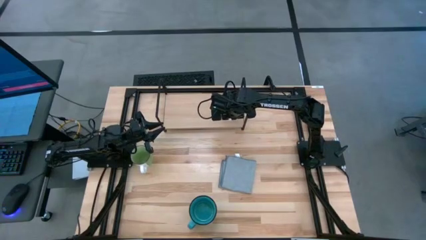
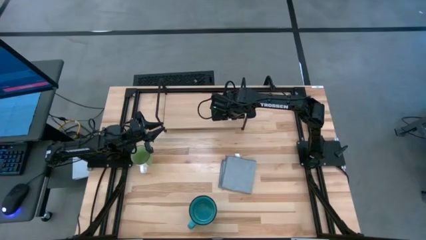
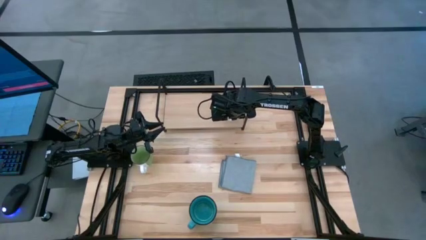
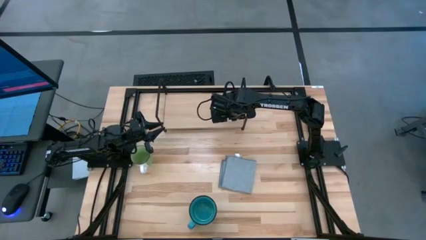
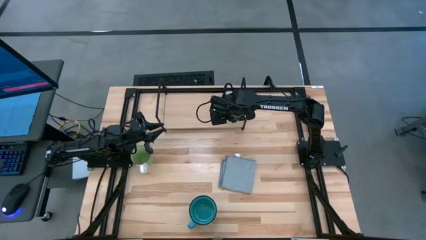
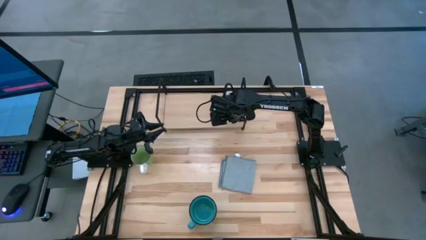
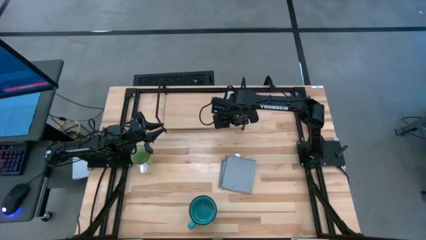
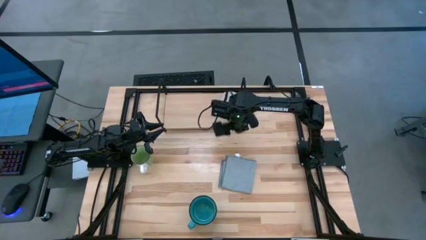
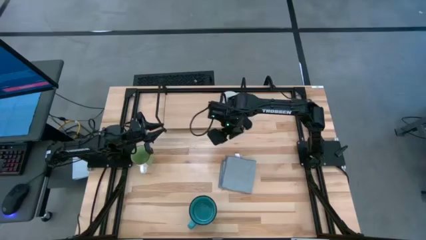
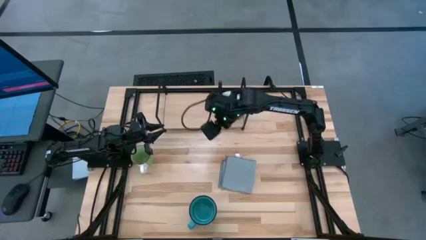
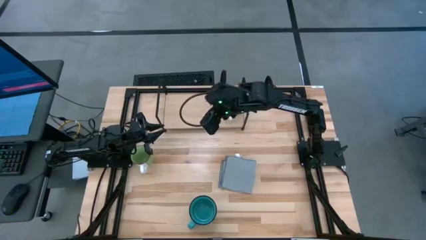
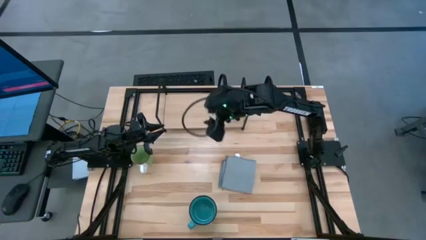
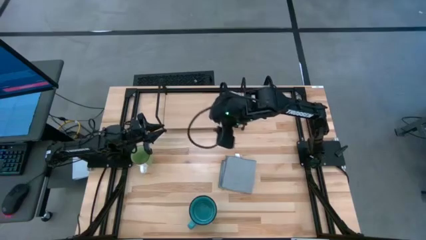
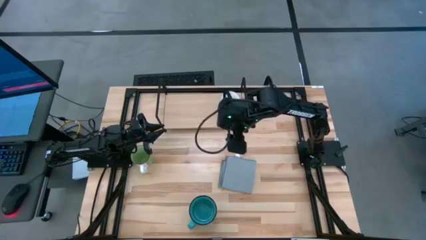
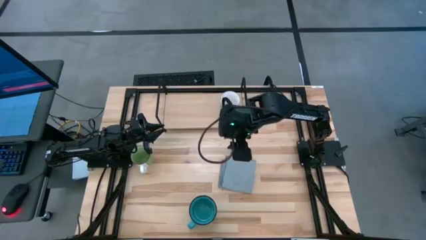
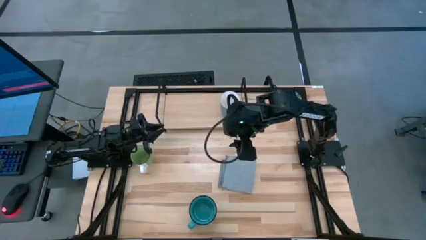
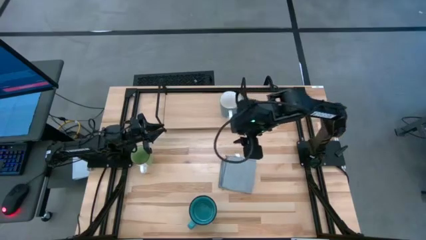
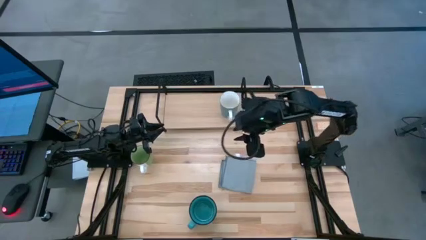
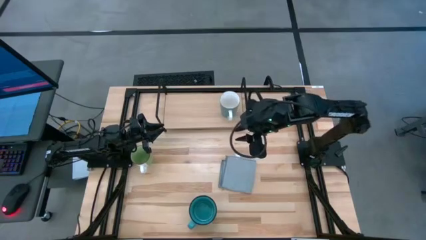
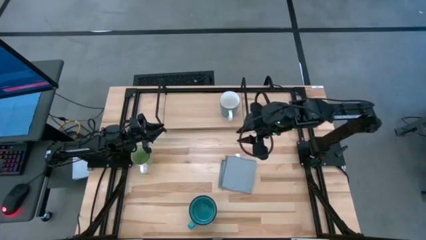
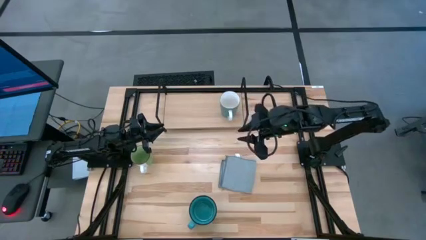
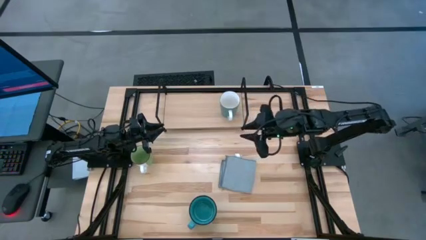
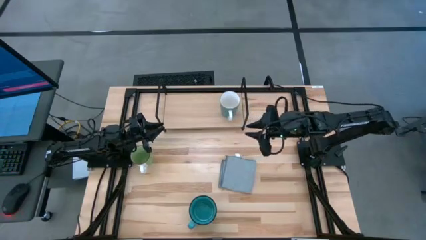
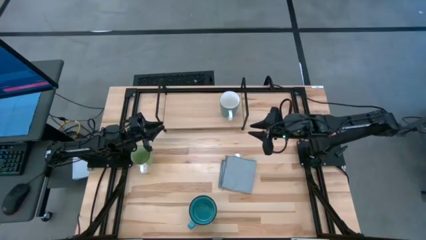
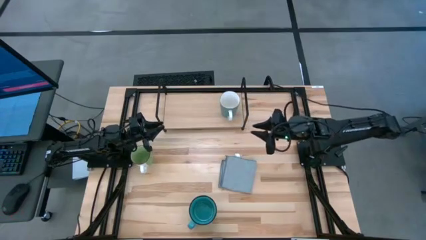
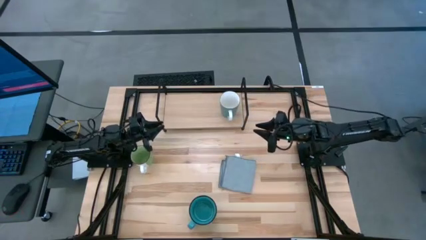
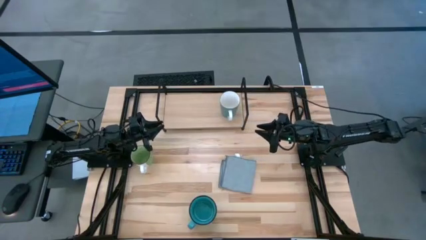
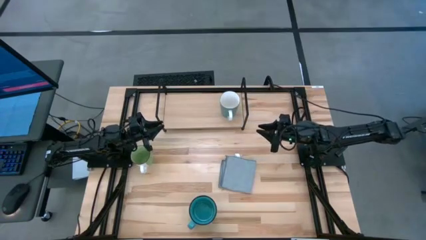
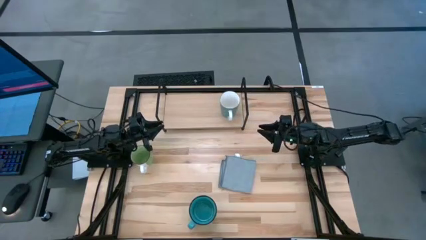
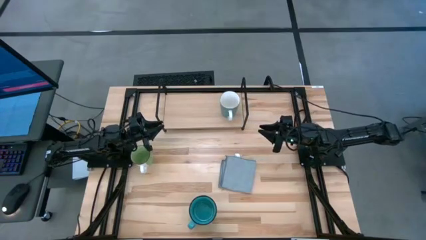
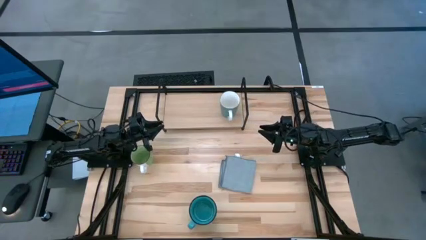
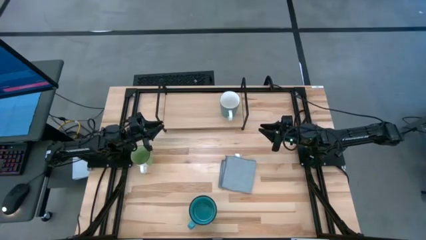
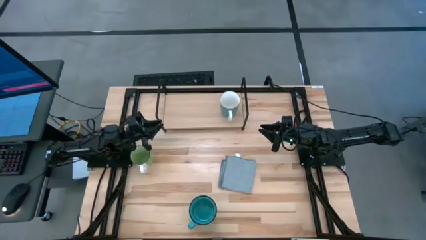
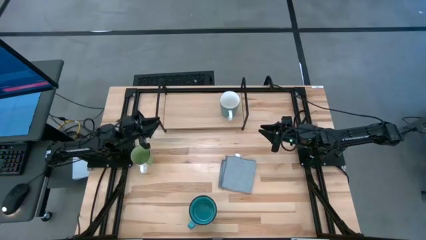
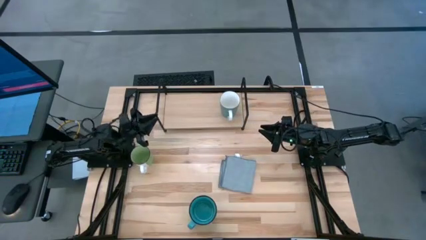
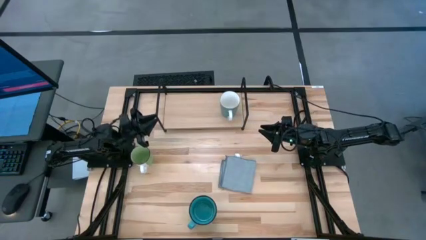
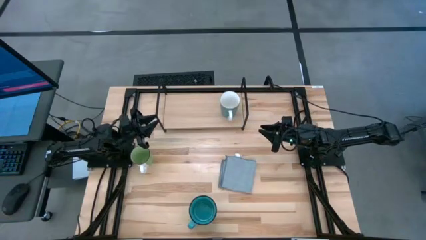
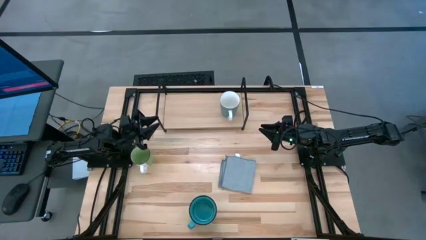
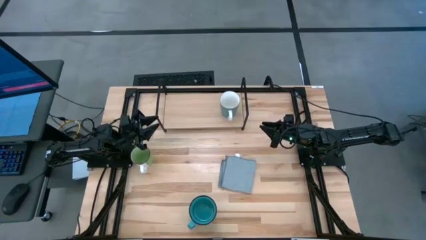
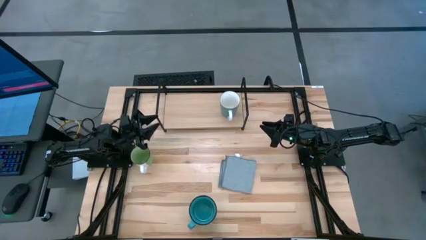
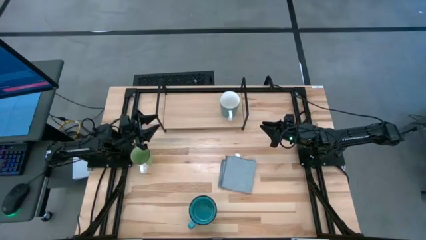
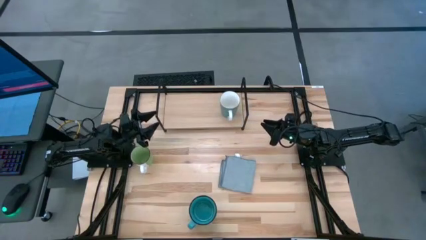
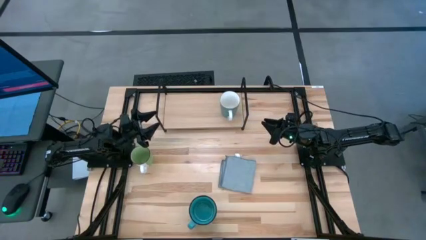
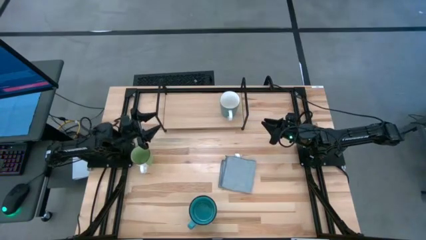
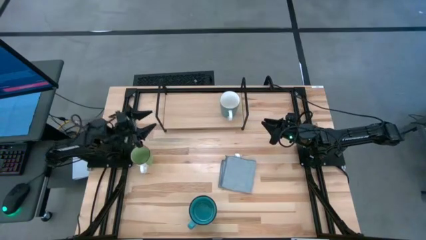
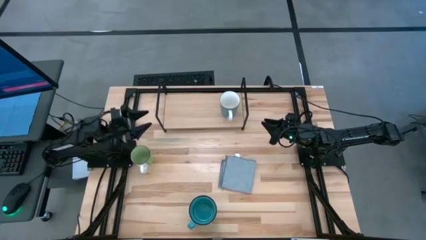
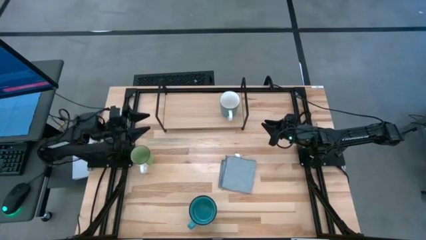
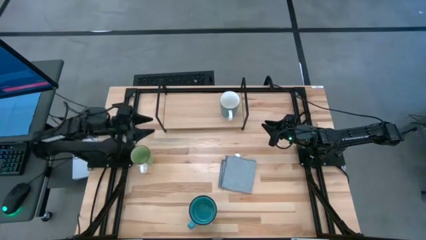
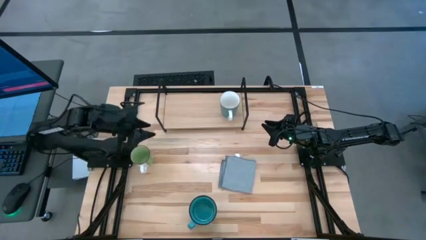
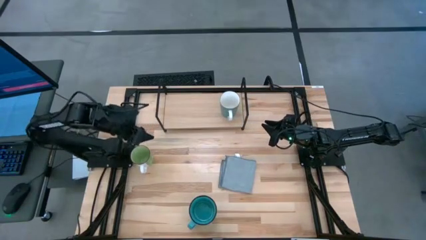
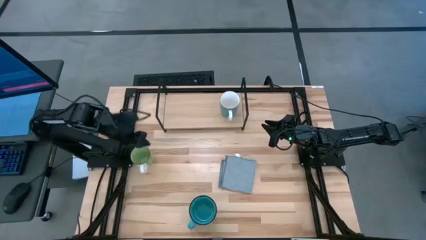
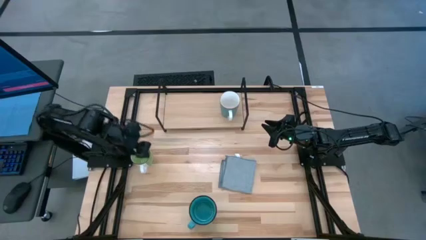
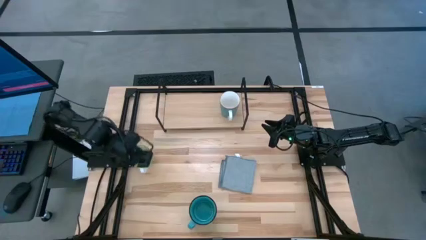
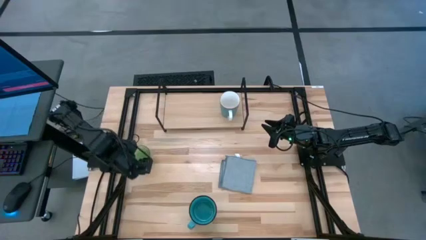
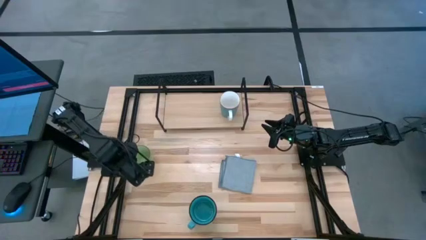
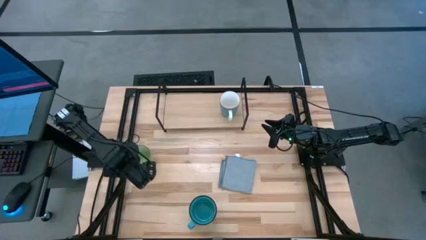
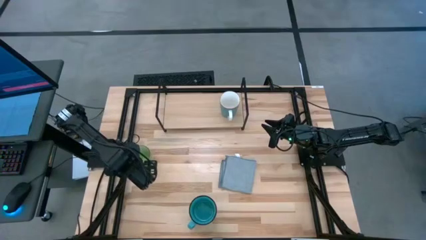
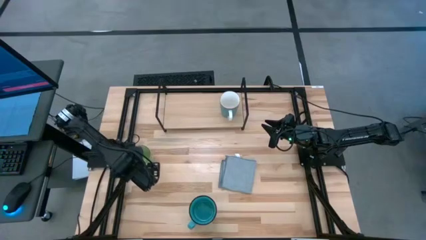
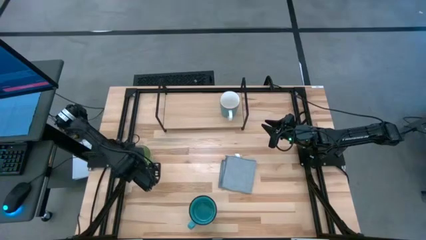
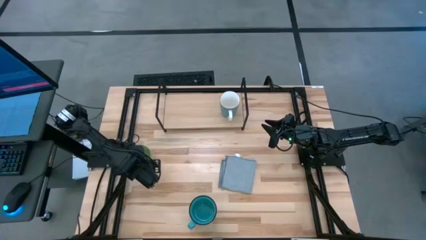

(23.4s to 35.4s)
Task: Stack small to large cups/mugs on shelf
Put the green mug on the shelf

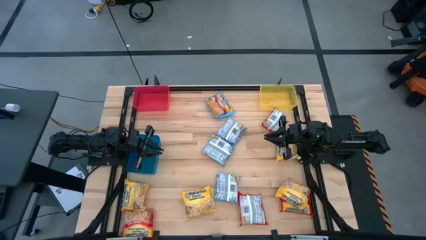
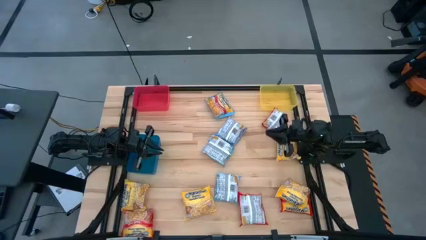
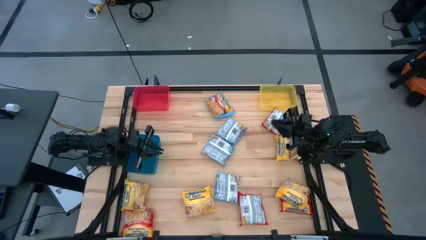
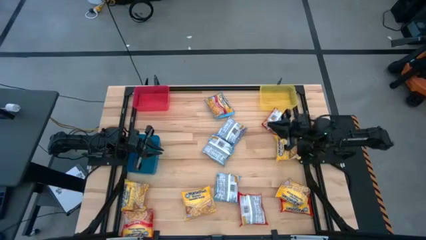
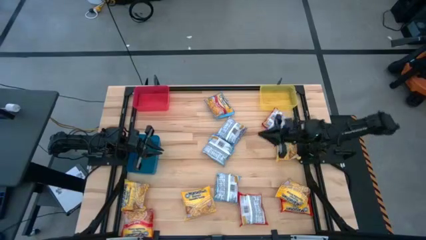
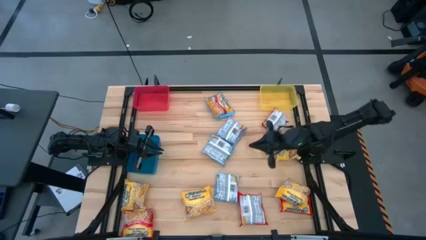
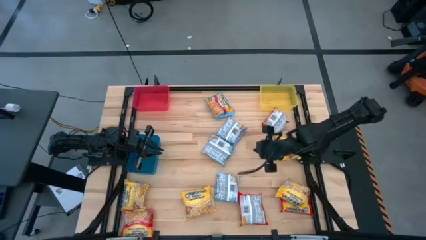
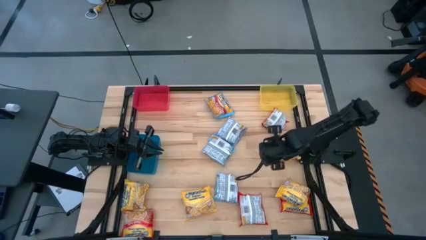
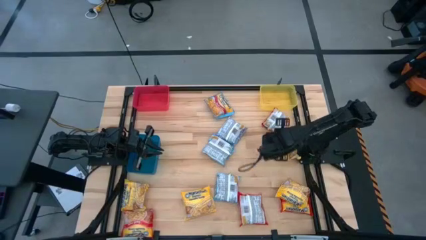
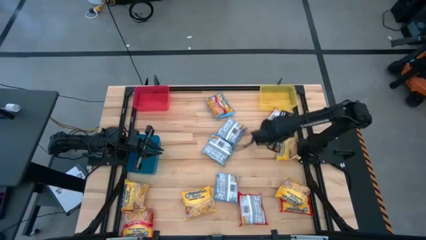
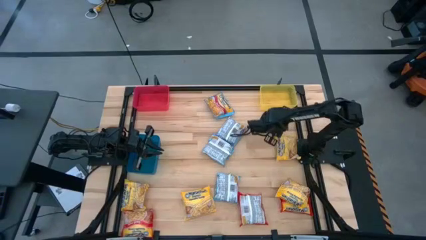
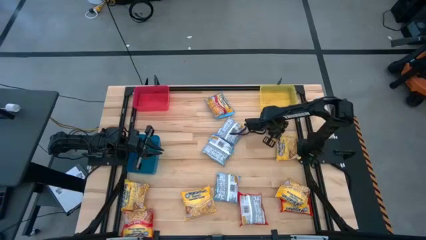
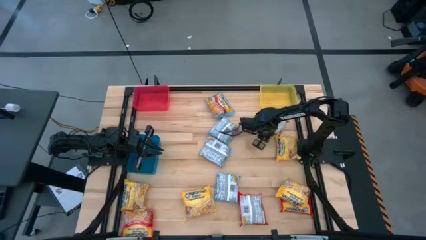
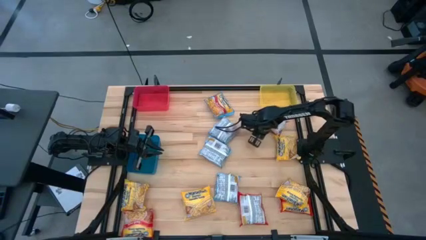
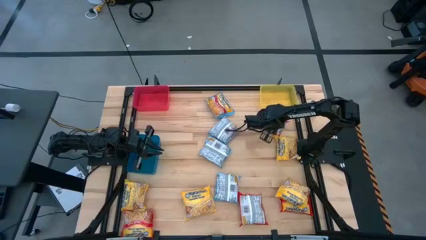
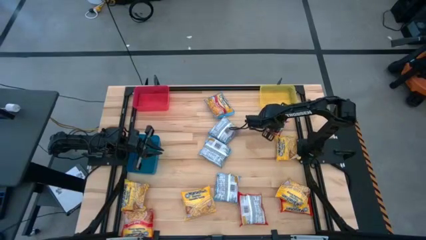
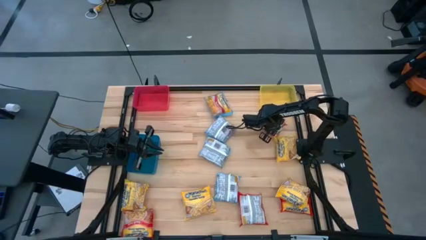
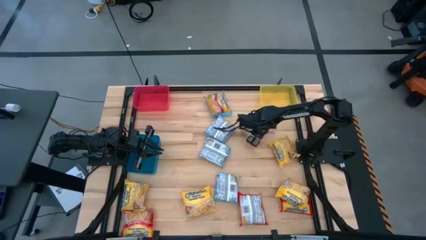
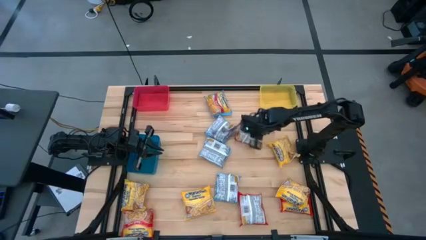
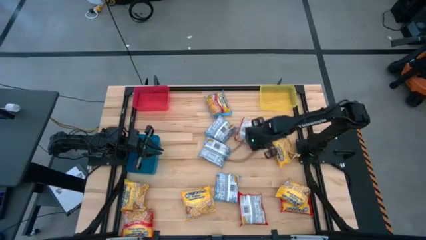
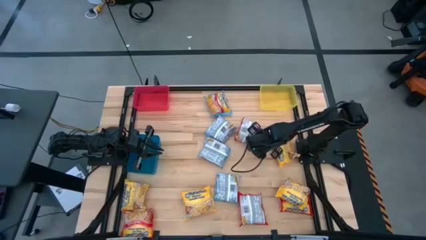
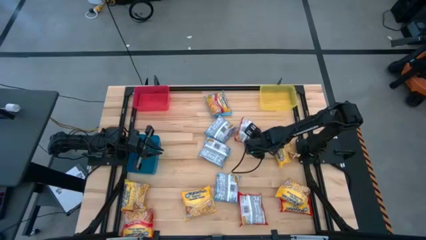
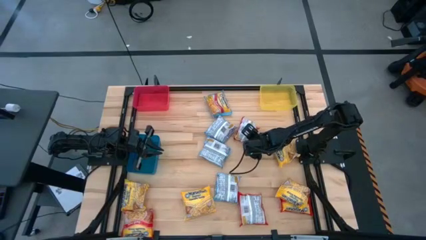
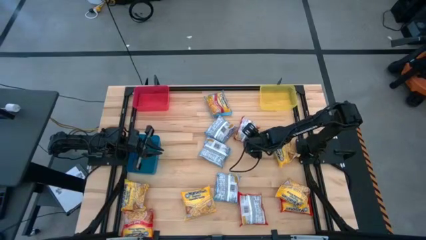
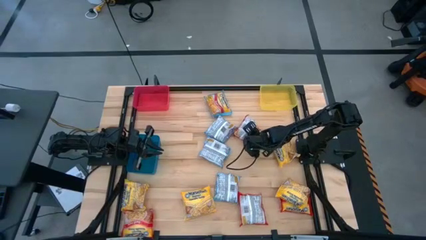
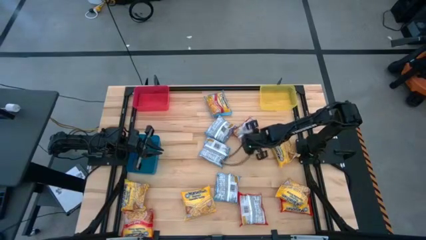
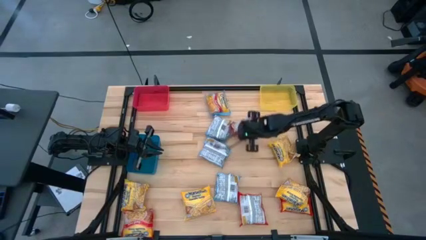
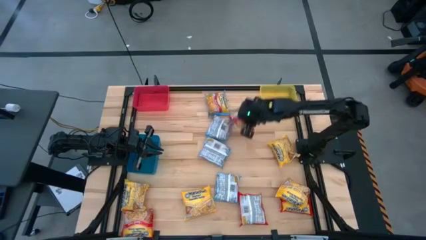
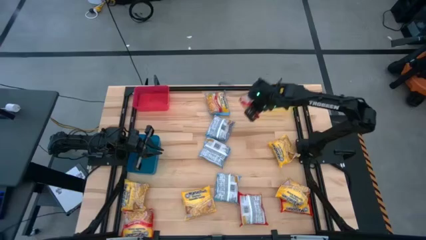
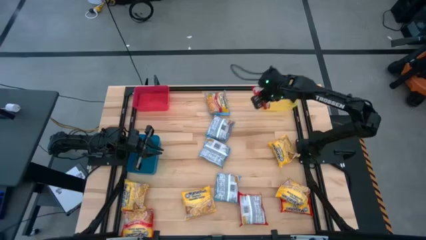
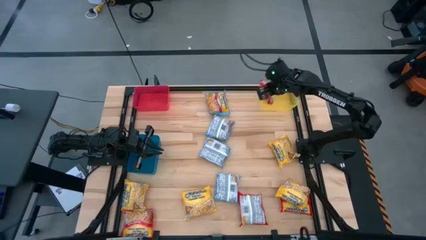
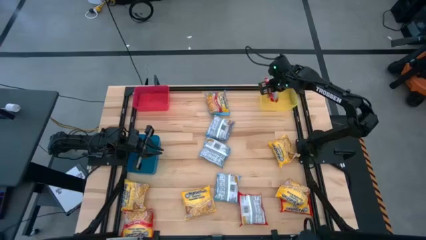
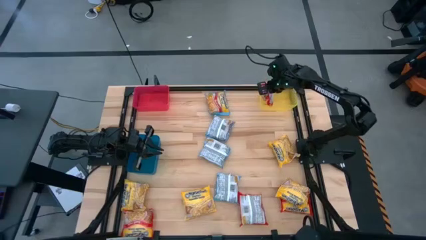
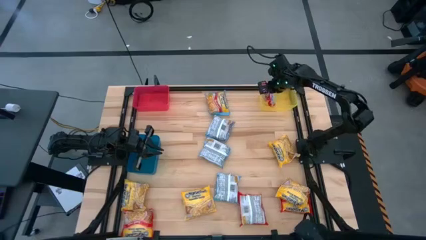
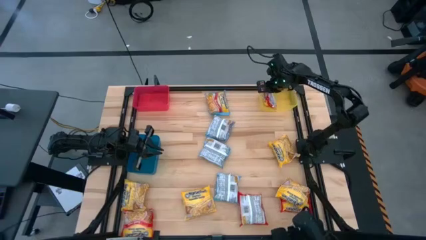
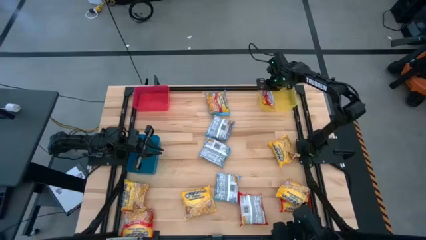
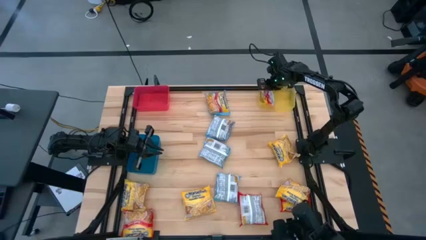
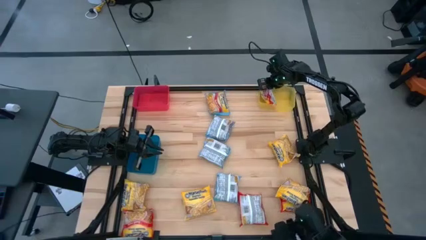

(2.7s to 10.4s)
Task: Sort Maruchan noodles
Put the red noodle pack into the yellow bin
